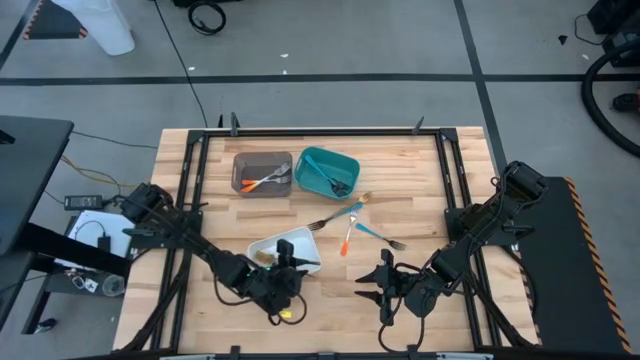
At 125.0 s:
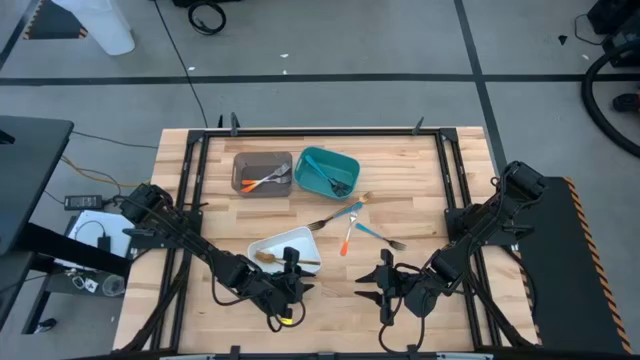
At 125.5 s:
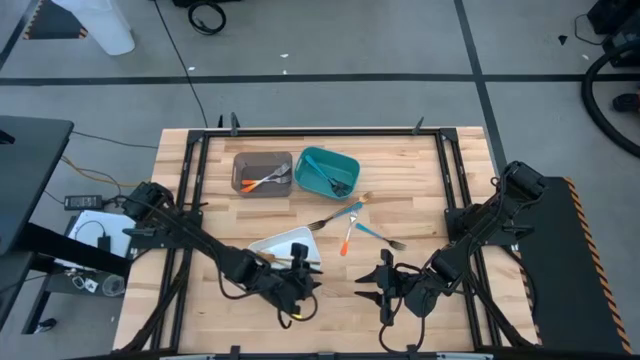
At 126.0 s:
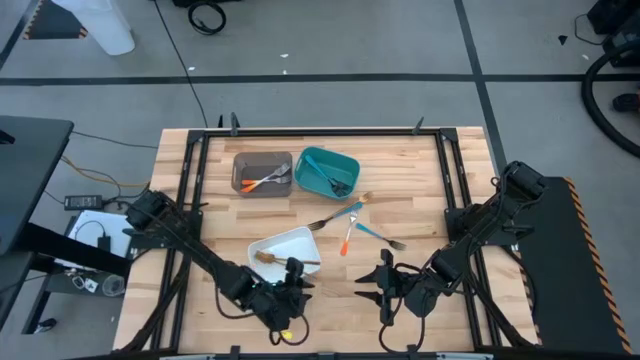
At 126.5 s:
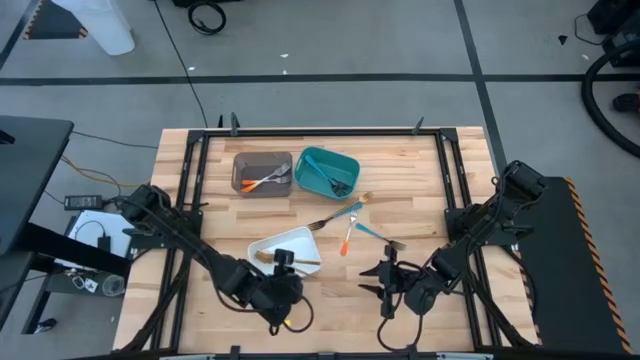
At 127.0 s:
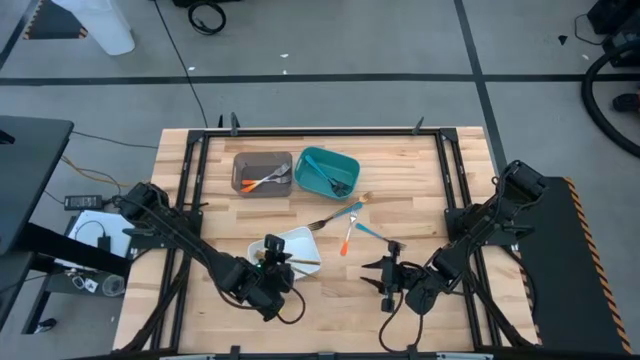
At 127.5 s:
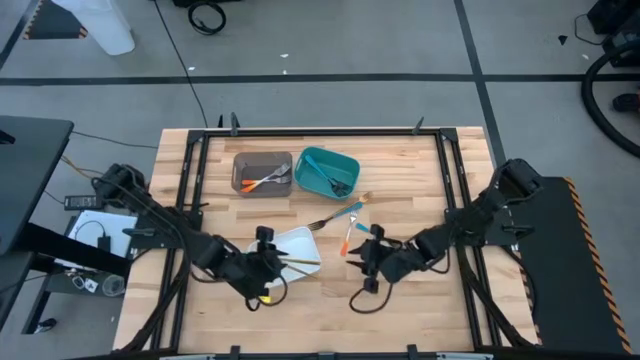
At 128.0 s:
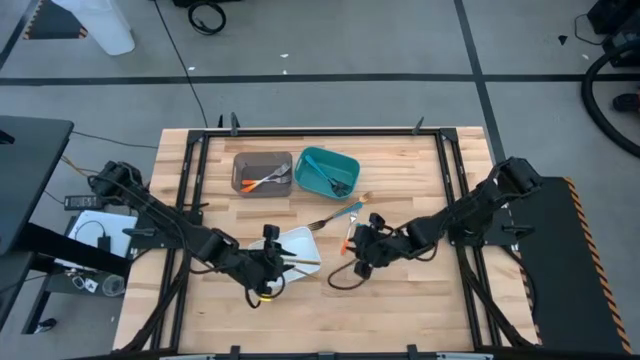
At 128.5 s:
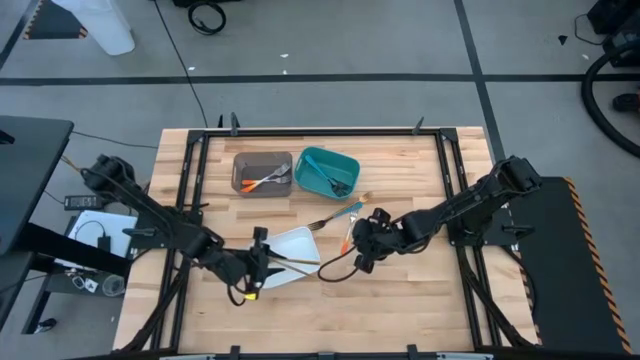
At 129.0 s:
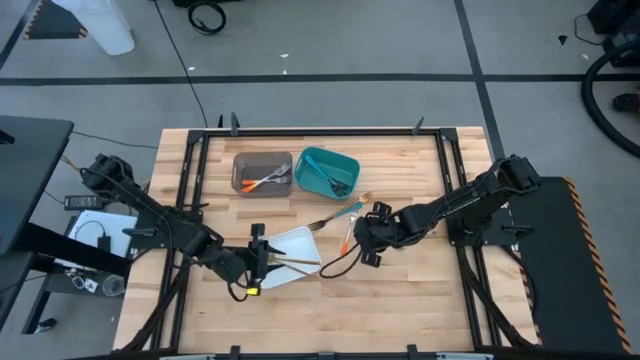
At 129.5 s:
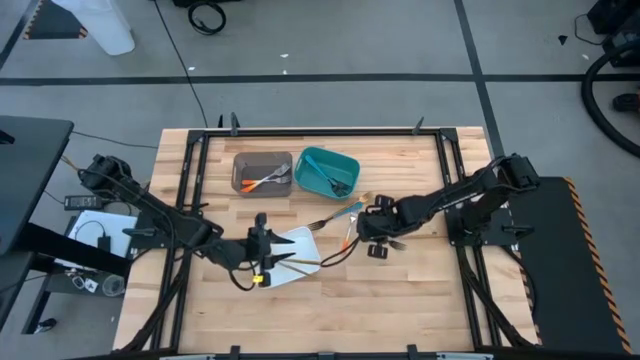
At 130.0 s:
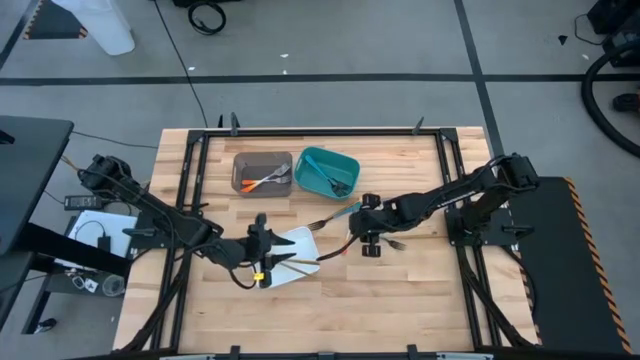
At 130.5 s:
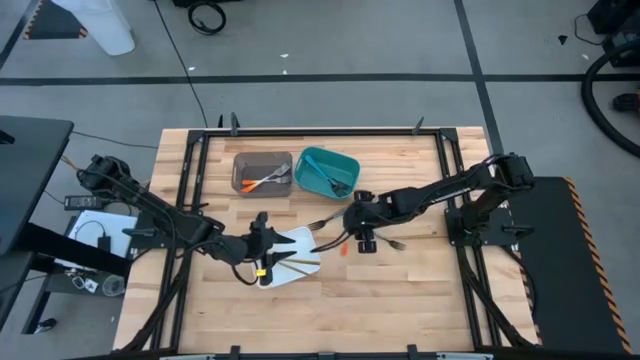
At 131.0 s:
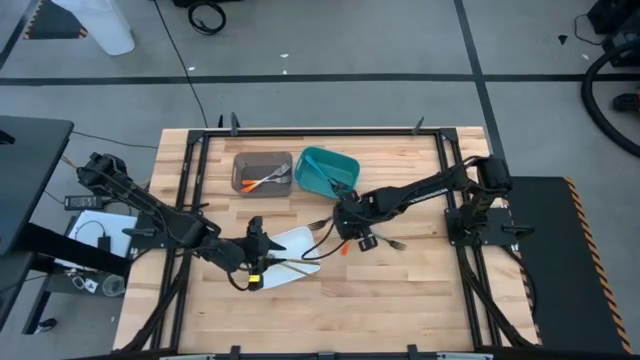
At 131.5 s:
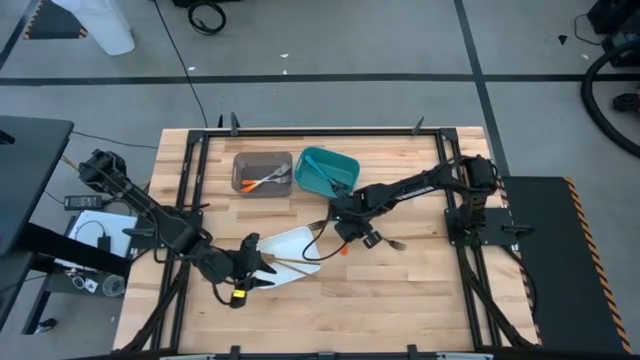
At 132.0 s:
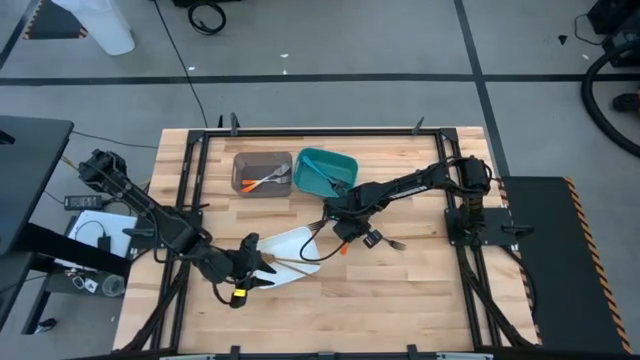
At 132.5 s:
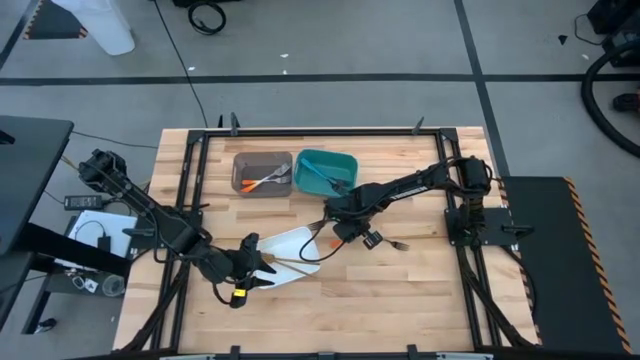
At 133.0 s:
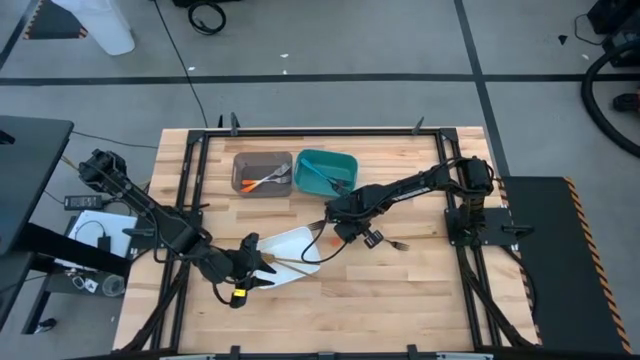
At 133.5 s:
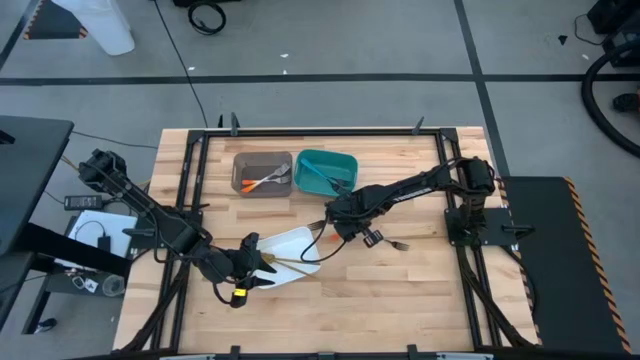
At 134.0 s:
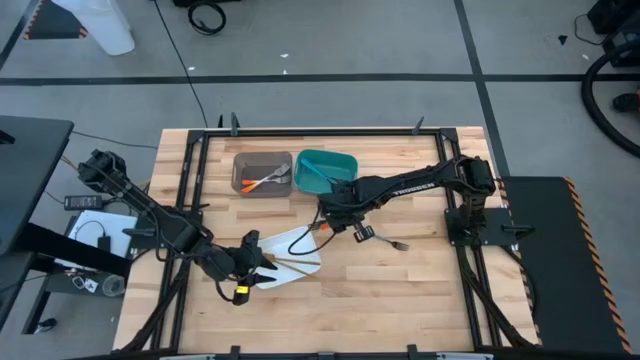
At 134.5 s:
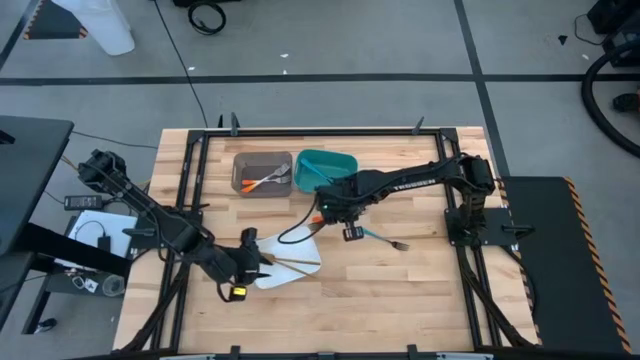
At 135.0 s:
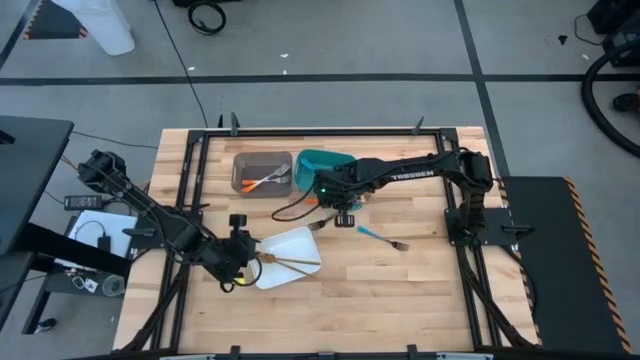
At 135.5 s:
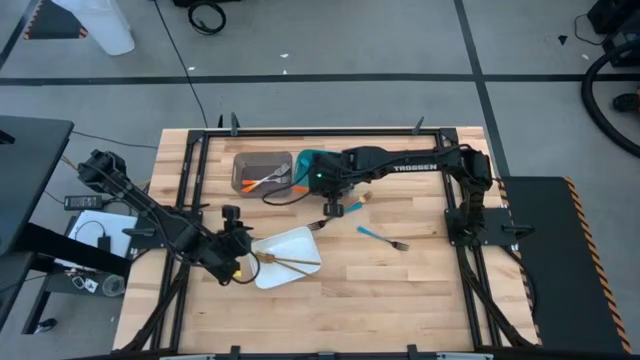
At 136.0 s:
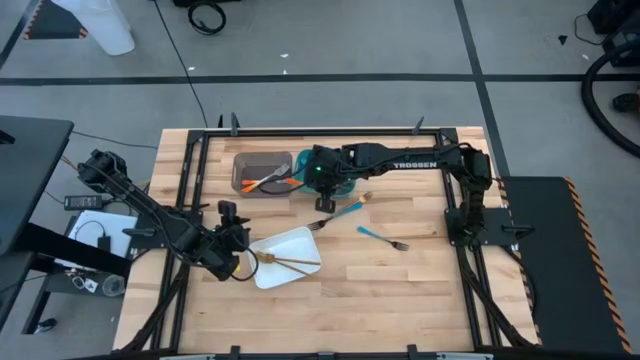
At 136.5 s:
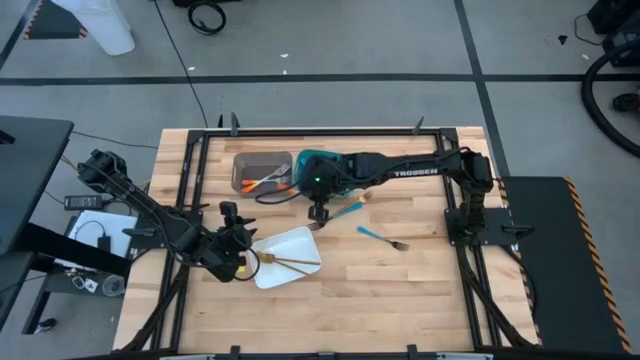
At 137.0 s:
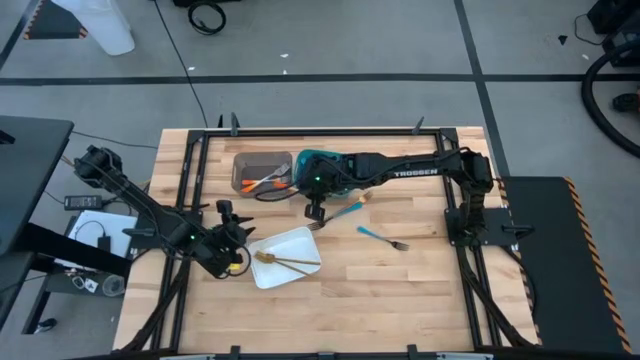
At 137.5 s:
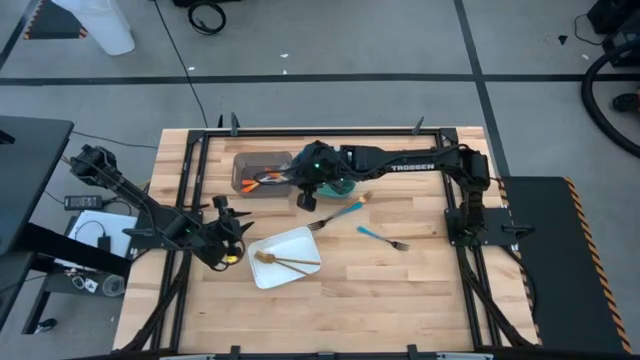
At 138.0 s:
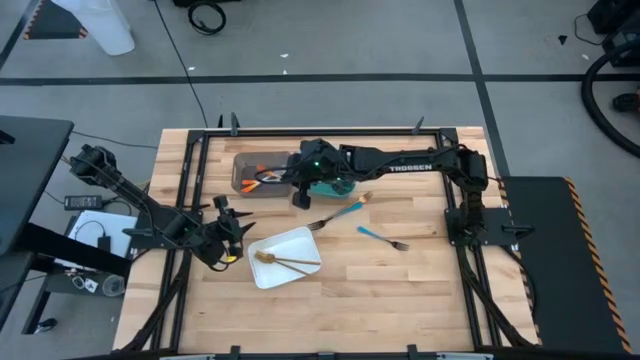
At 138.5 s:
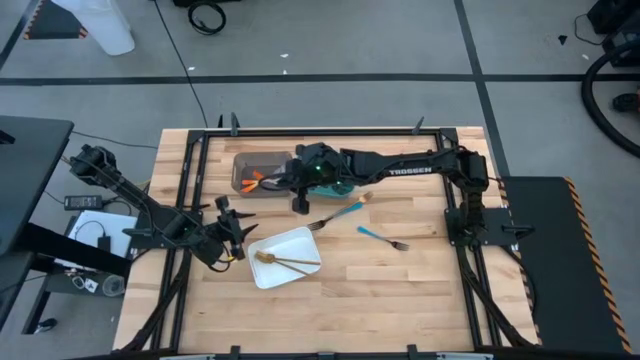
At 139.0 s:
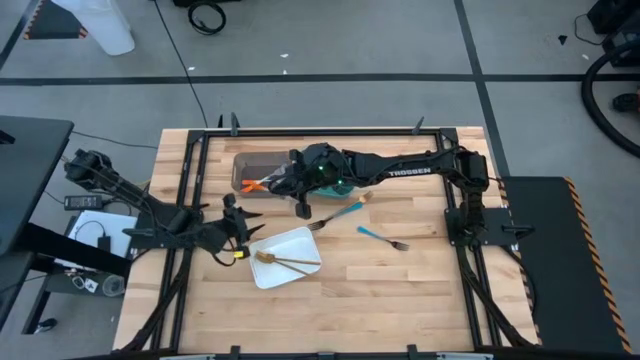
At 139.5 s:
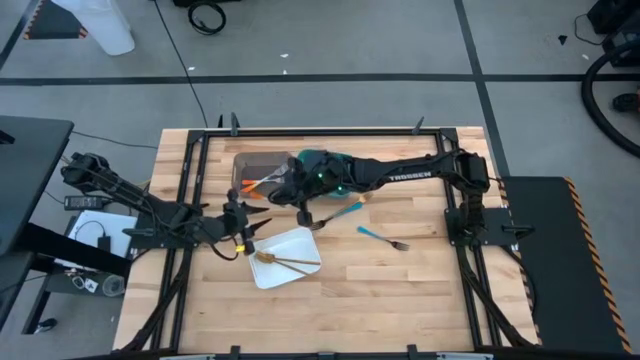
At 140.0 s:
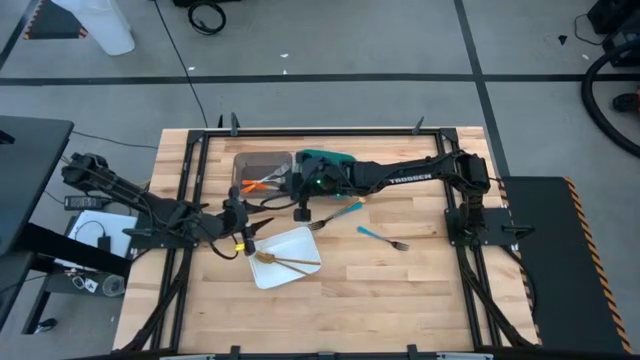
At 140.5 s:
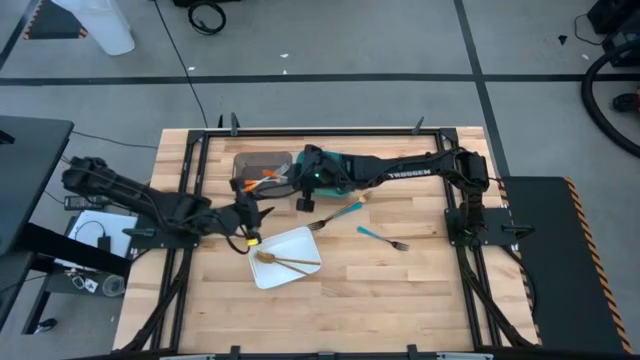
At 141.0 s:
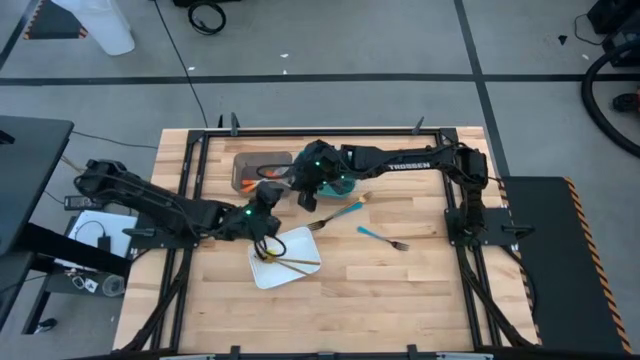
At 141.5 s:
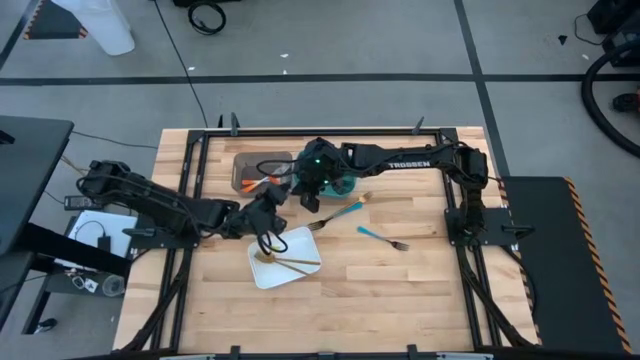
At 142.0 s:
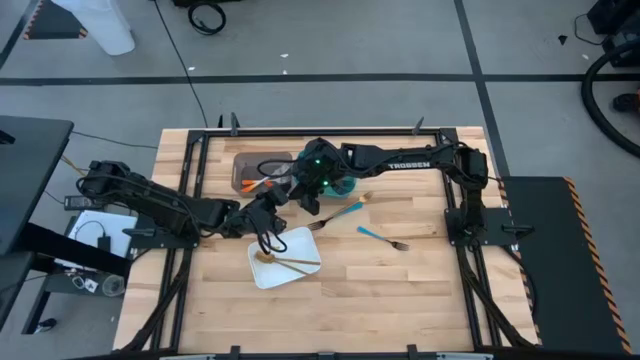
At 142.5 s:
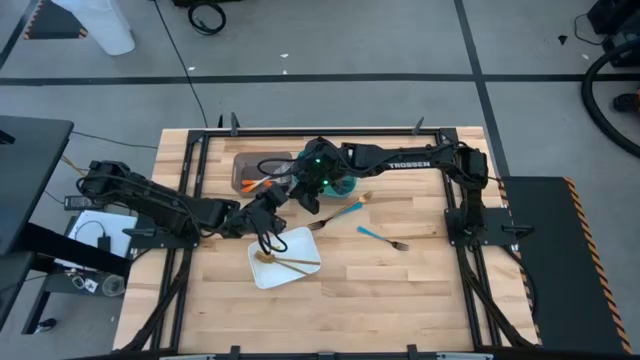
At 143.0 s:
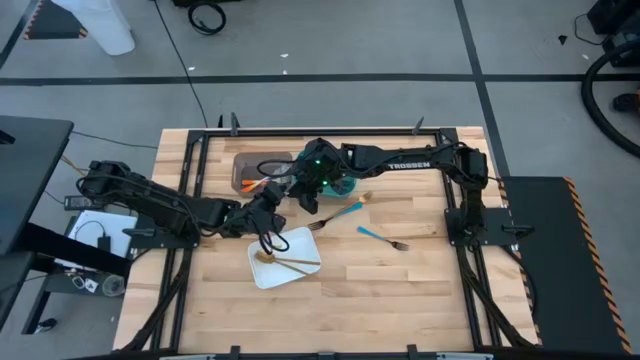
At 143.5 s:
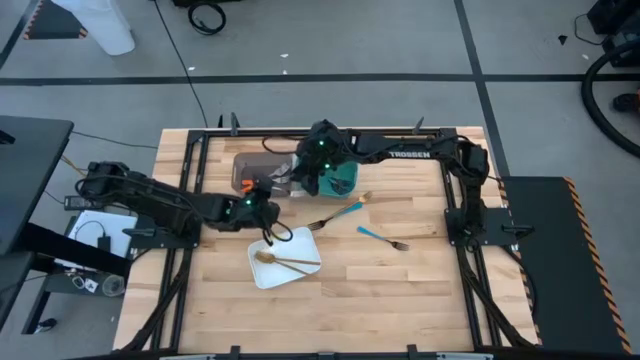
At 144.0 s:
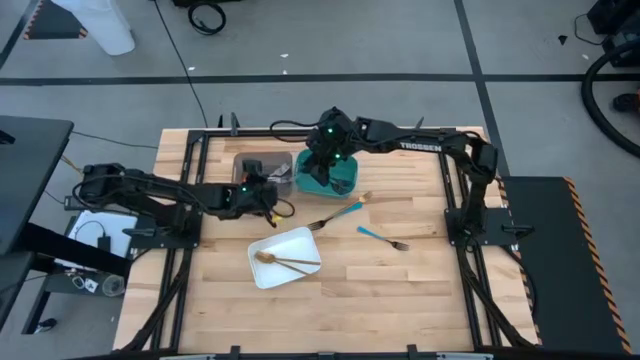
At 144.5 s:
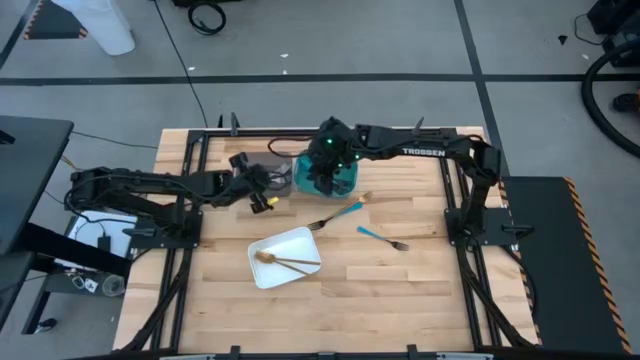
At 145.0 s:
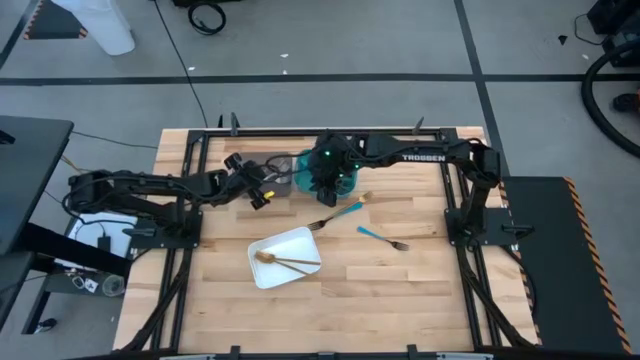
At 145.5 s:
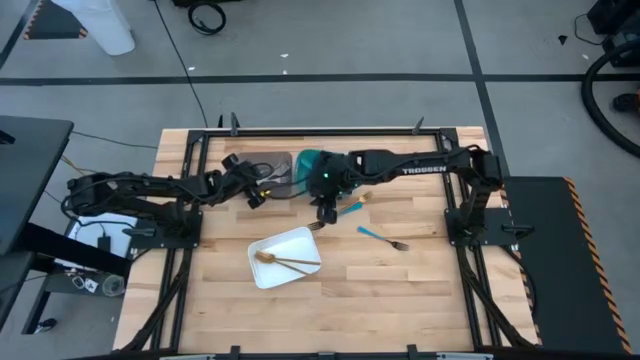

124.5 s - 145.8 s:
Task: Sort silverware by color (type)
Put the orange fork into the black bin
